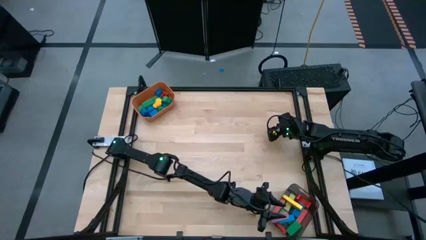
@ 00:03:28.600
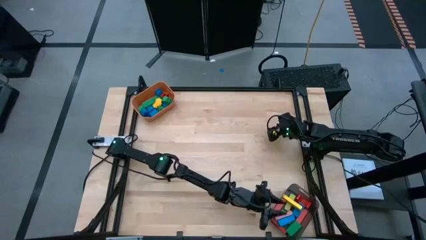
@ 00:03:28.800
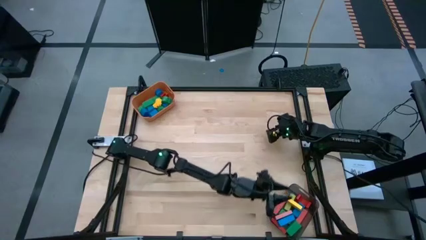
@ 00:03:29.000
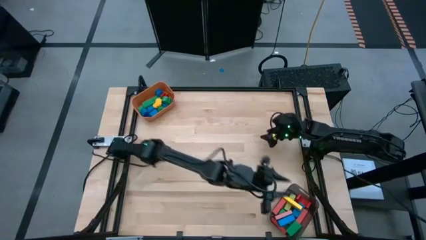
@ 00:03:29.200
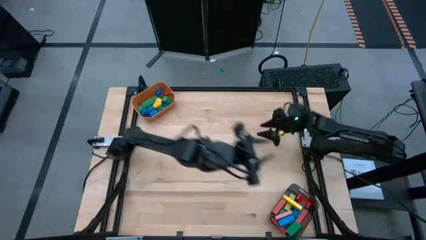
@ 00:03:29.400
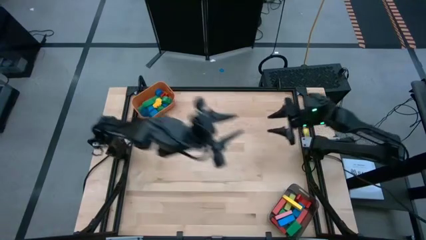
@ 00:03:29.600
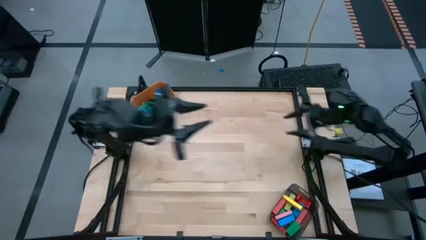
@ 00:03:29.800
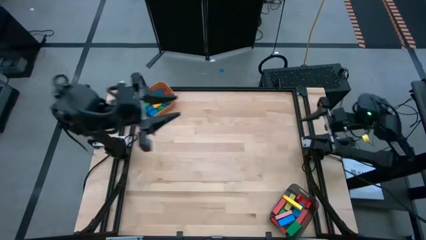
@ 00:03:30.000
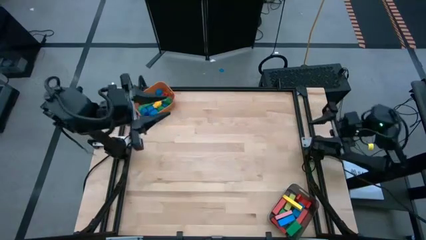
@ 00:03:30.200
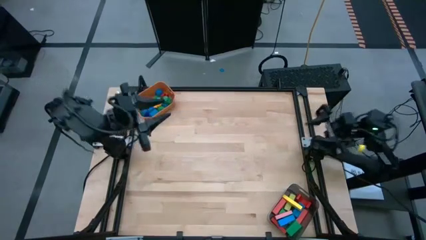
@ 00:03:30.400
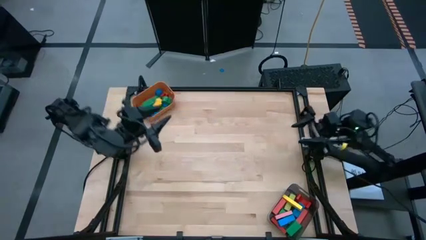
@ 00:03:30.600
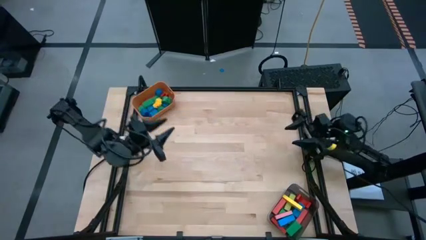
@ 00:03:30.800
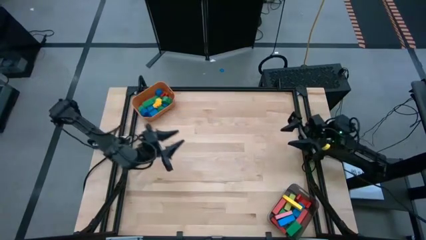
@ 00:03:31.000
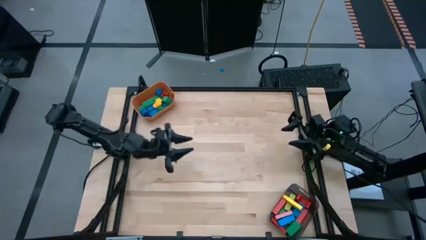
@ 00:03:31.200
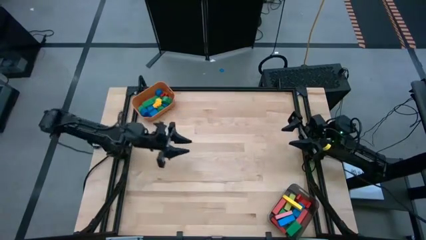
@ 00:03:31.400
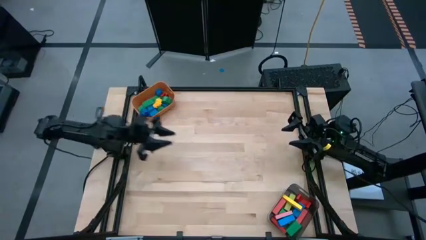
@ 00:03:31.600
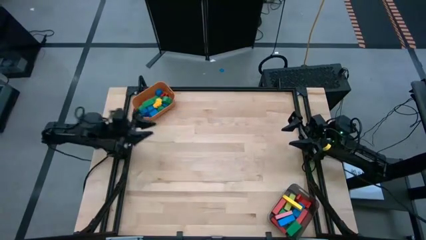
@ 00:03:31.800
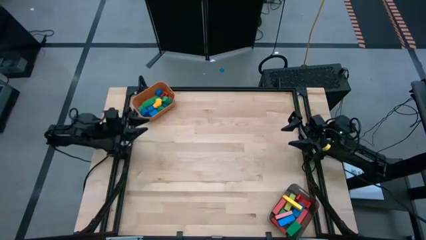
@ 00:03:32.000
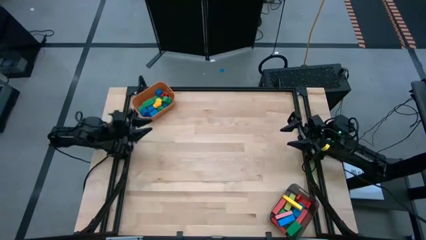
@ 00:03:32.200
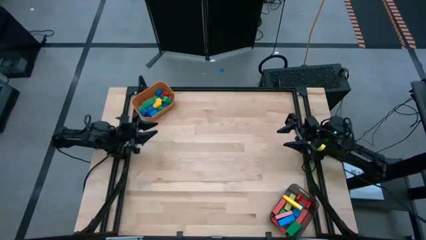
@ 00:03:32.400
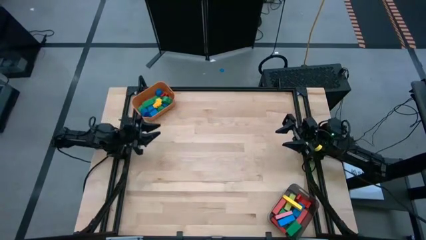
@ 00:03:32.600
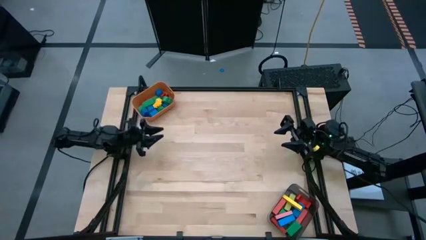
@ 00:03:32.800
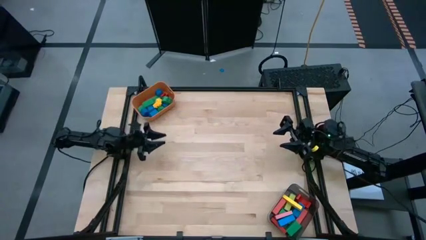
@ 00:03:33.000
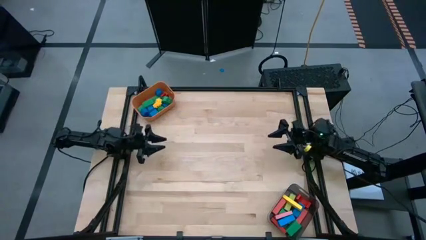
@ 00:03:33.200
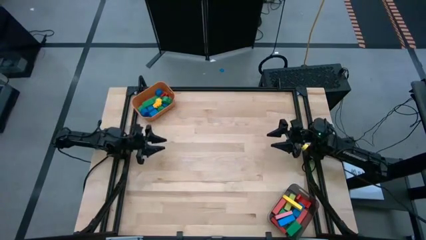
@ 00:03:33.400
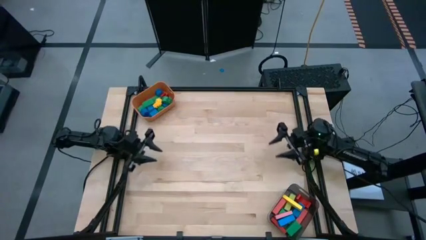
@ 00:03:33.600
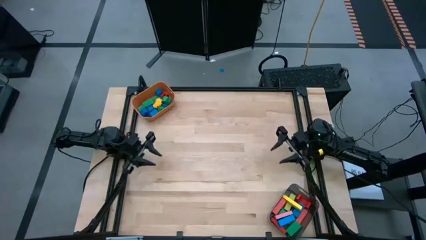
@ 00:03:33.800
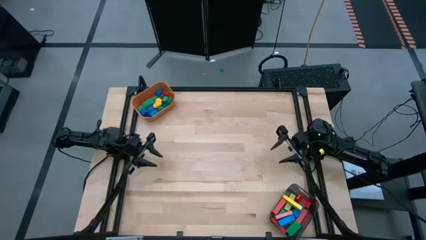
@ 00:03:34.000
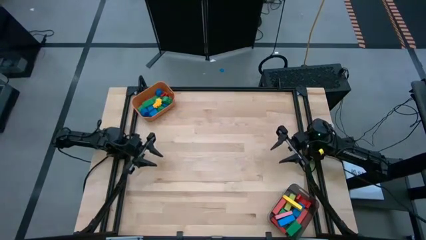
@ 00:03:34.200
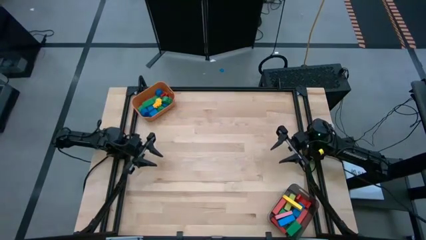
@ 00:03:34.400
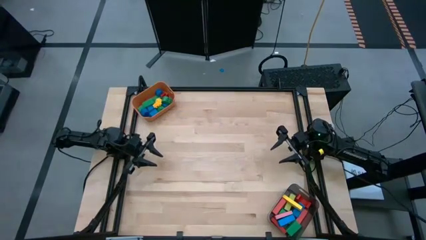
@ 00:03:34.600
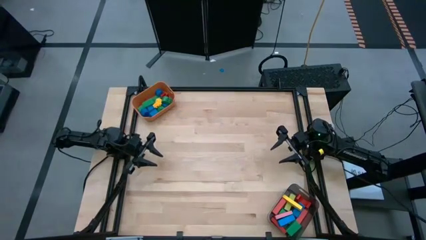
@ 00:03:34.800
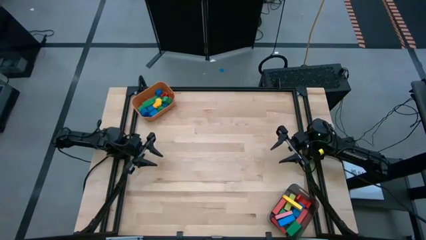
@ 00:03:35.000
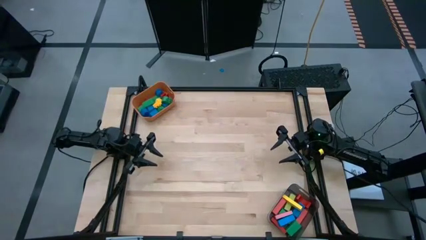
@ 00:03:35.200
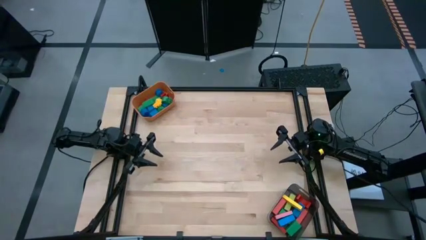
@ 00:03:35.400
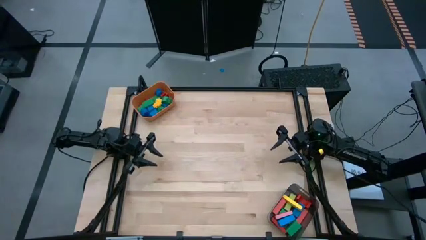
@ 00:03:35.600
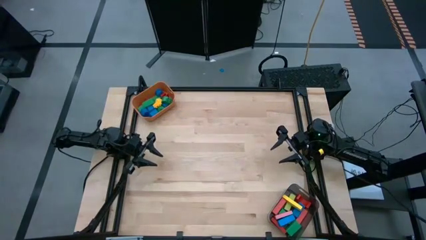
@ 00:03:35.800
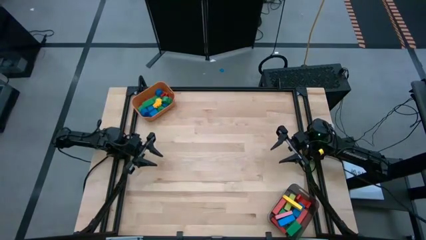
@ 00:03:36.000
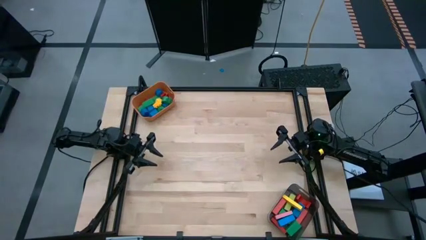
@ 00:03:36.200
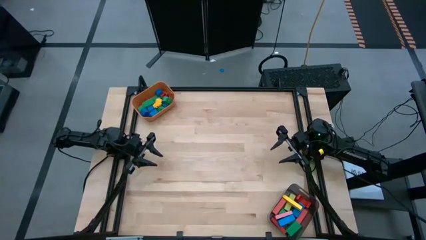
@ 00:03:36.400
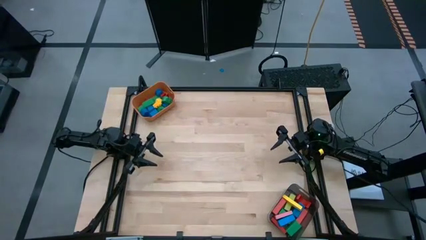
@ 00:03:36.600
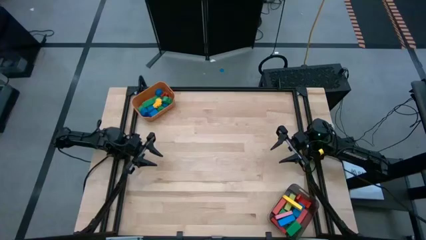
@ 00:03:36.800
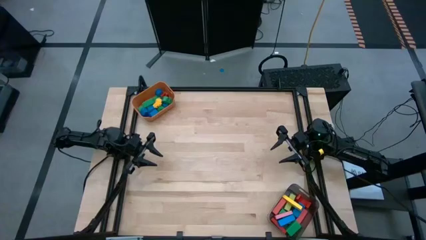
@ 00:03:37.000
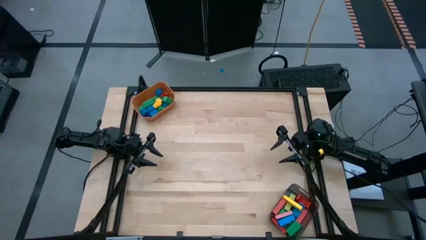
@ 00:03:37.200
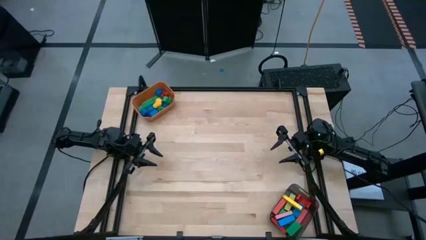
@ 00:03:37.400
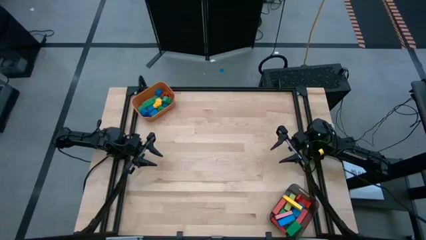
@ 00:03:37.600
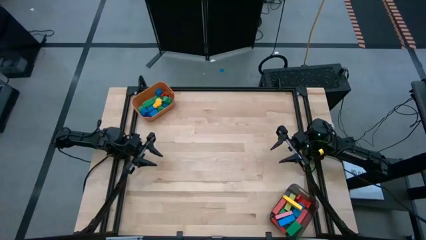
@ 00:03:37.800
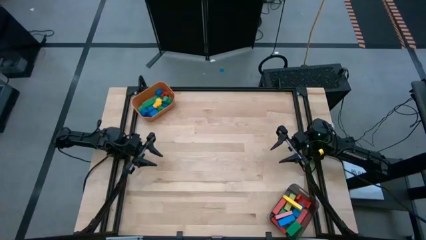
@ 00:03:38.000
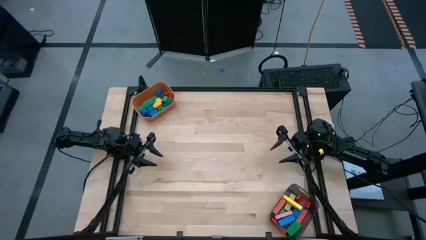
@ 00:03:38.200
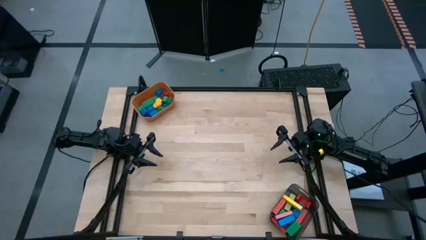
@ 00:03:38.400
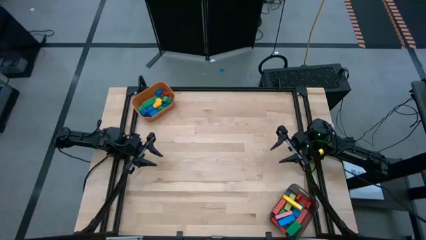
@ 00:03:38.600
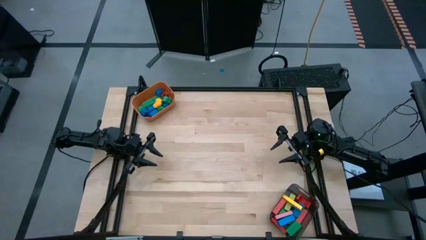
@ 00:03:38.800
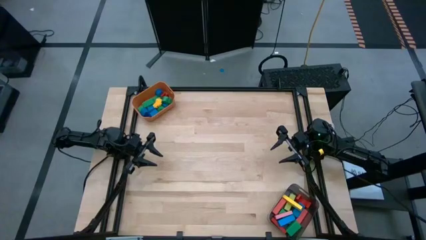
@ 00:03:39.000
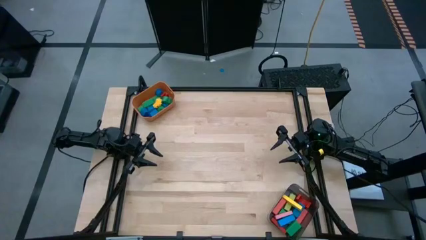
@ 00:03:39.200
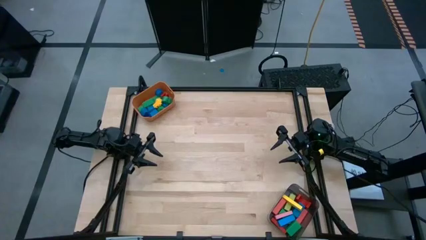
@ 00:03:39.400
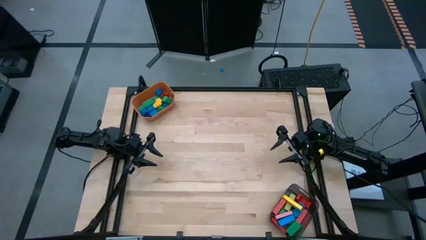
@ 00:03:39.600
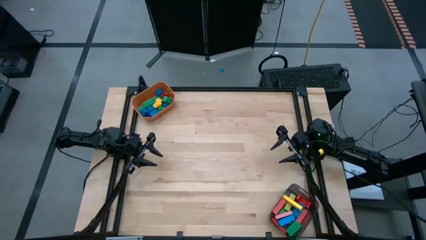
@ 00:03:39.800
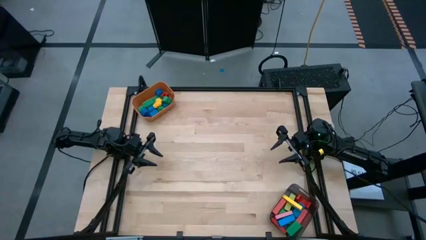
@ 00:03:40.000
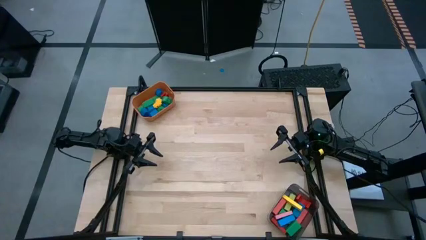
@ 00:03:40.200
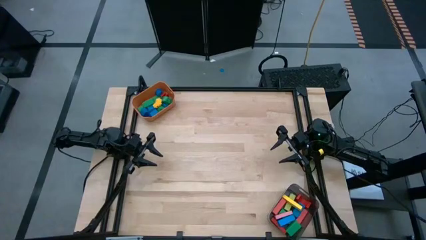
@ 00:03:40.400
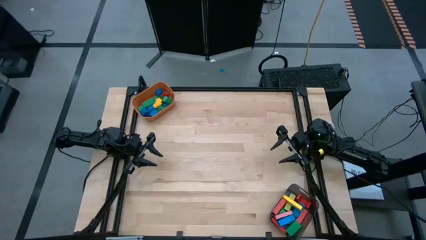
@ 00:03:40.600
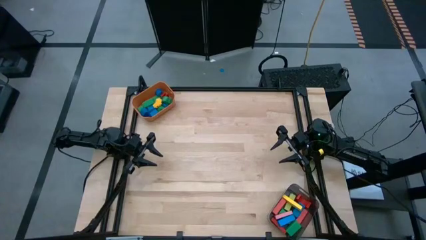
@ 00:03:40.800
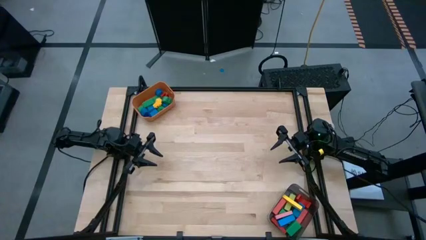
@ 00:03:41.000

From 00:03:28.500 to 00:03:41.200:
Task: Sort blocks by size
Return to Home Position
